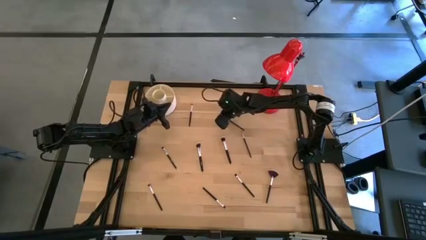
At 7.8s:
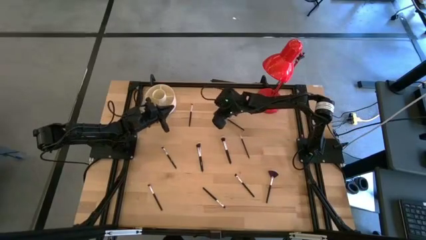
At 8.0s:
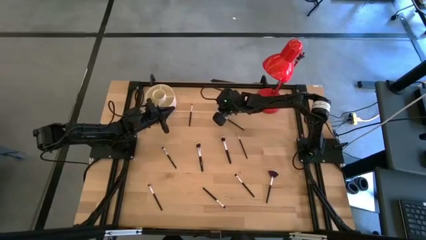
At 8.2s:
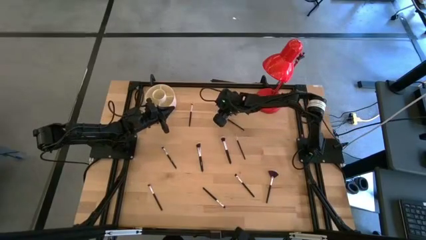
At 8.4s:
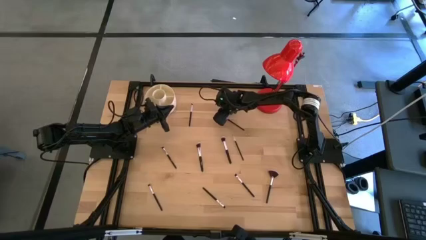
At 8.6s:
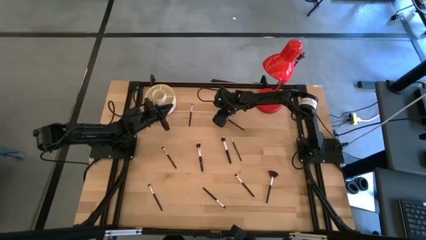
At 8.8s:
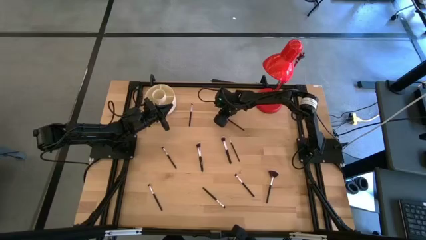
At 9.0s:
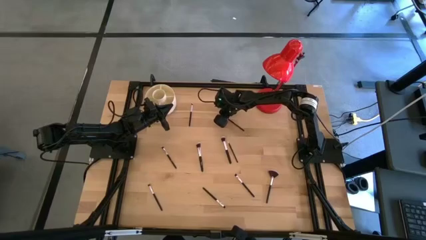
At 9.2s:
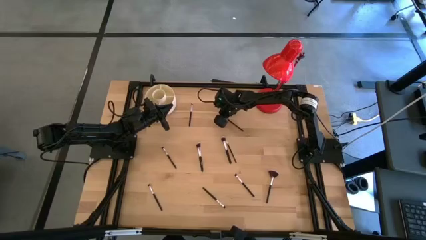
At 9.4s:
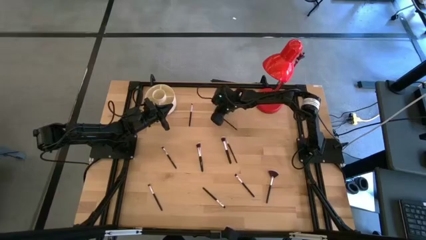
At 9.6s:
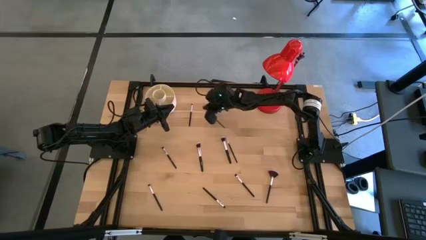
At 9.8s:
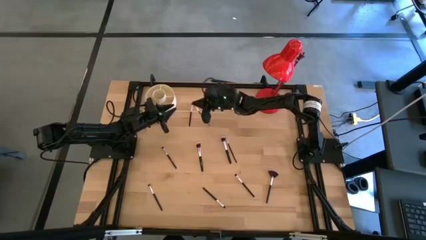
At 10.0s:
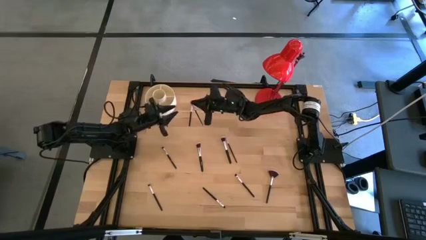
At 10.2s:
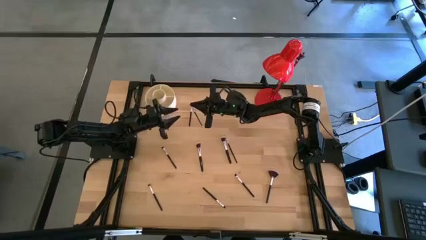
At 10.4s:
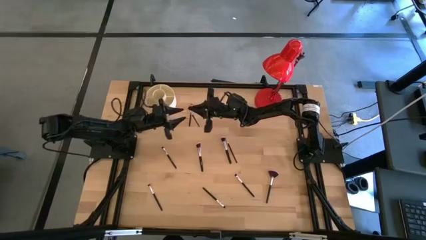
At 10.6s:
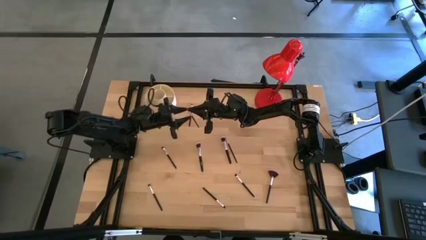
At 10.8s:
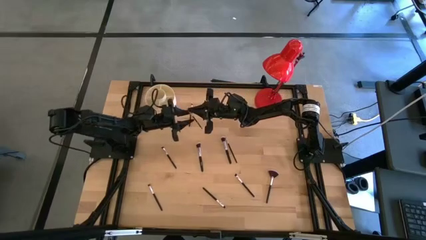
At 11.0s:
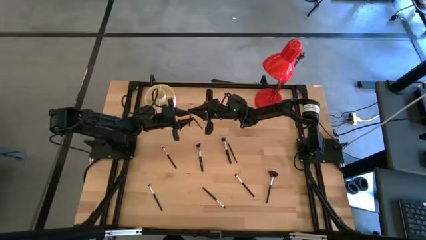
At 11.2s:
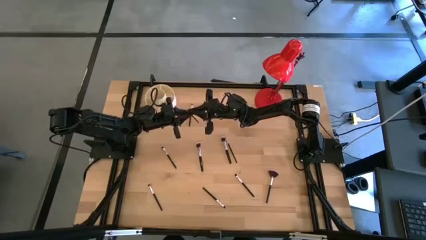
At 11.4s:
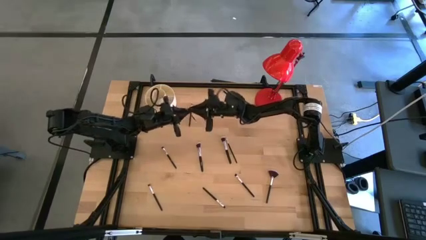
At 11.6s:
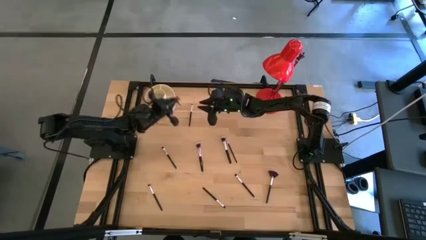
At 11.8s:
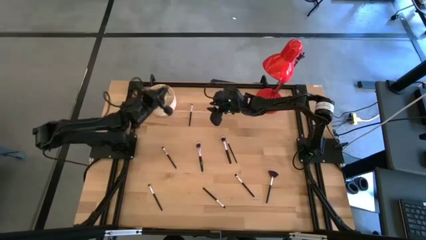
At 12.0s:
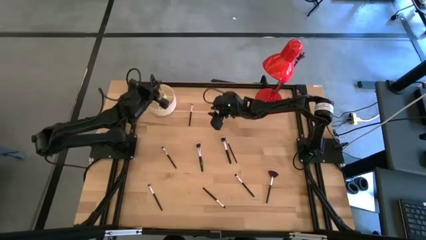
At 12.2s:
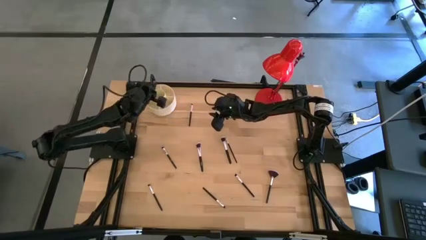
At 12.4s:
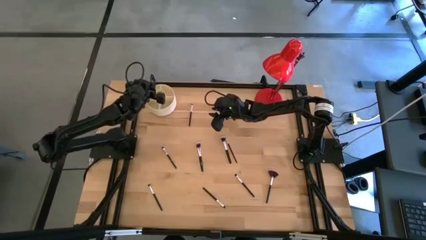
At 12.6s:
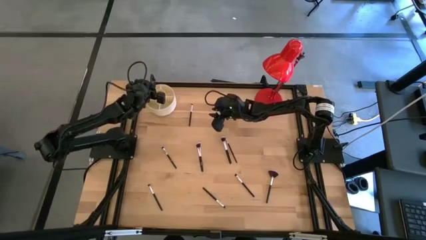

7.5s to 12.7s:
Task: Put items in baskets/containers
Put the eyeshadow brush into the organizer

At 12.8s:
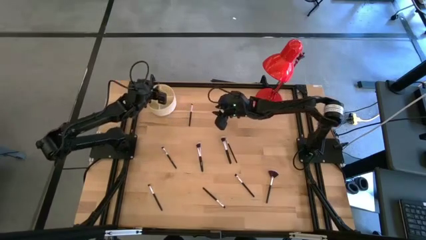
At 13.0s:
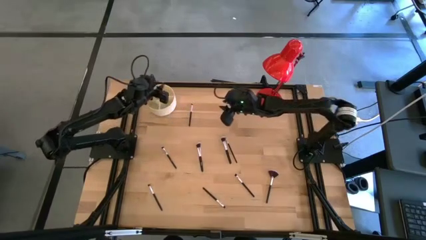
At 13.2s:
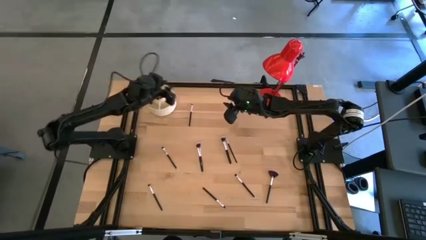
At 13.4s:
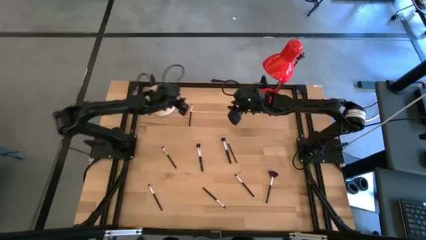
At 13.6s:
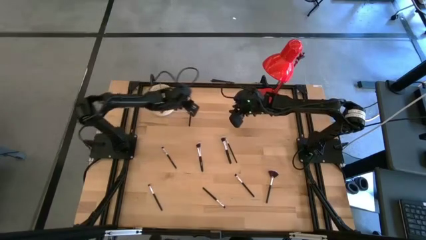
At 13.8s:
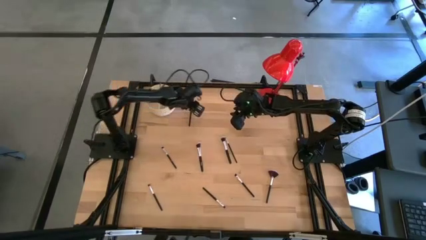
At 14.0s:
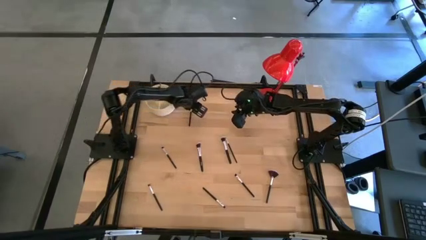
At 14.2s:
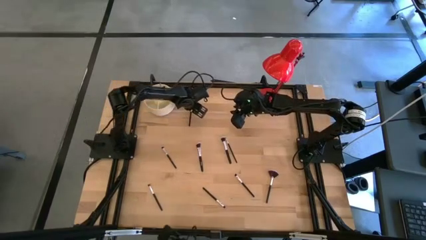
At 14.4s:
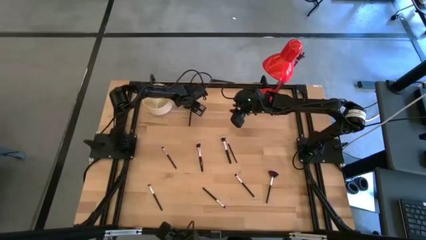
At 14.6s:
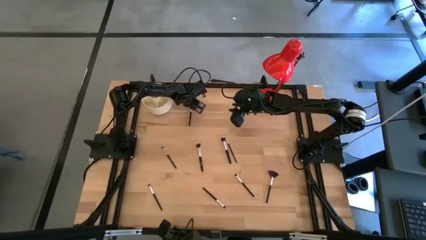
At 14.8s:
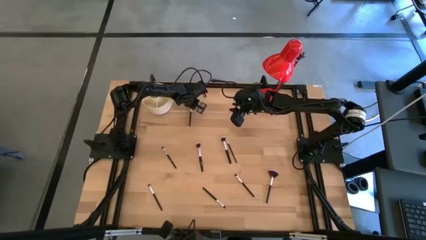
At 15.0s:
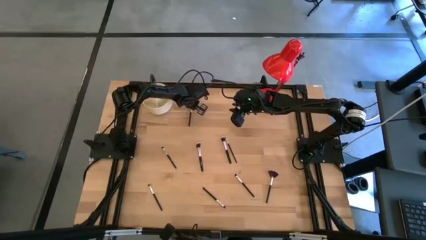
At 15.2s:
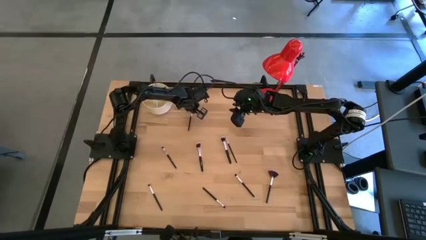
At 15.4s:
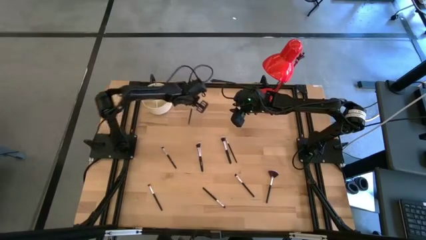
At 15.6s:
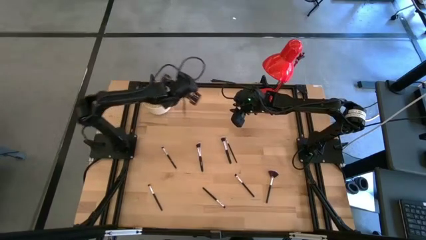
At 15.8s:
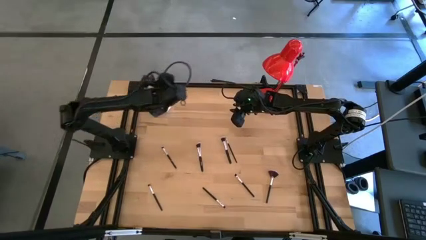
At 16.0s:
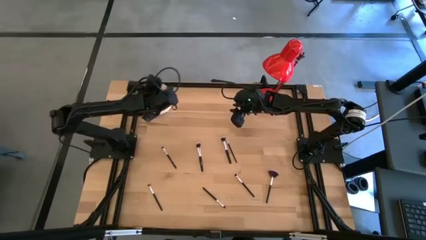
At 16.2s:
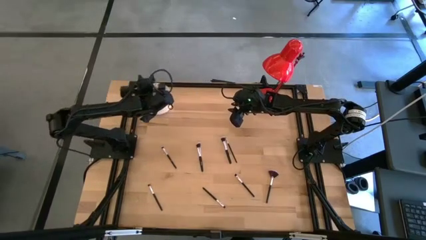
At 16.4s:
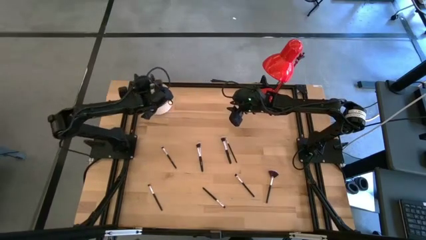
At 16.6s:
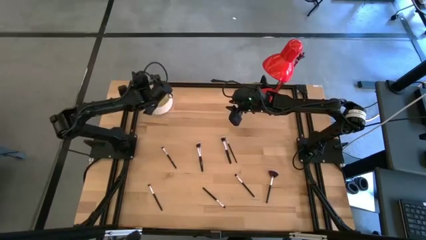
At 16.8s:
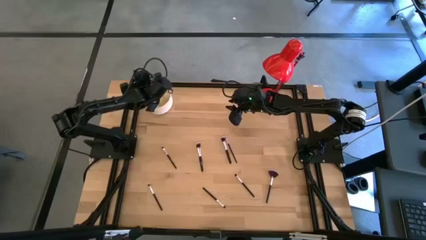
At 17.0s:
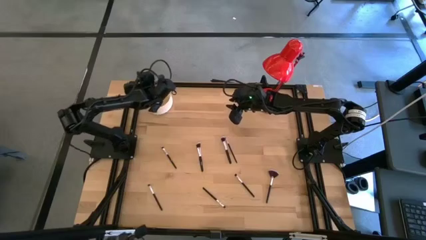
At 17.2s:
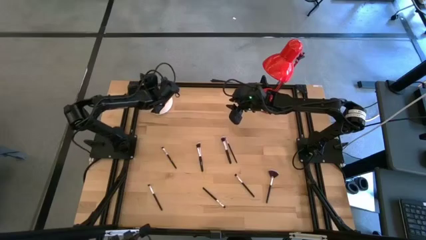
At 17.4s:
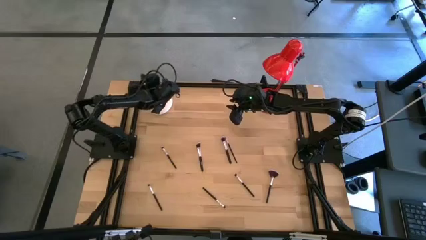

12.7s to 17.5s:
Put the eyeshadow brush into the organizer

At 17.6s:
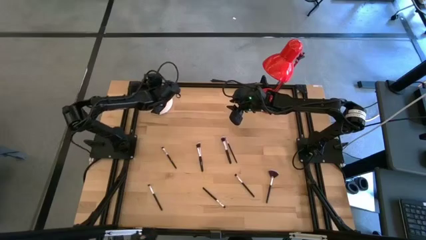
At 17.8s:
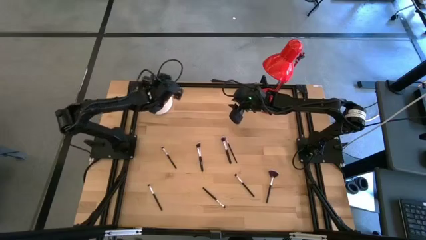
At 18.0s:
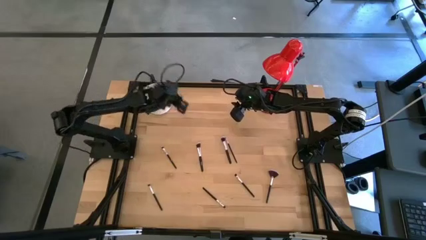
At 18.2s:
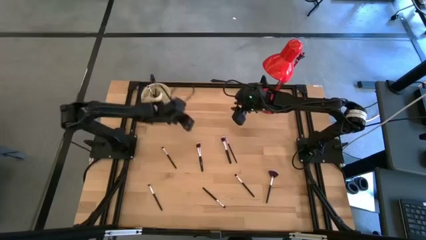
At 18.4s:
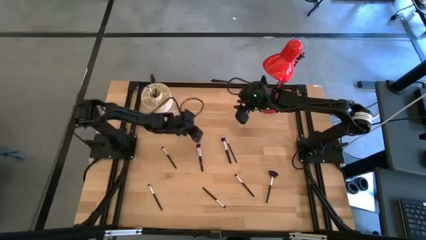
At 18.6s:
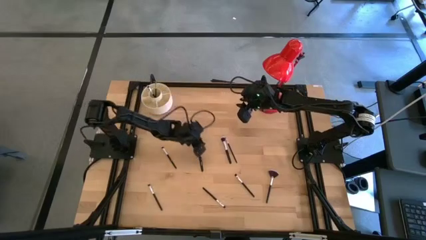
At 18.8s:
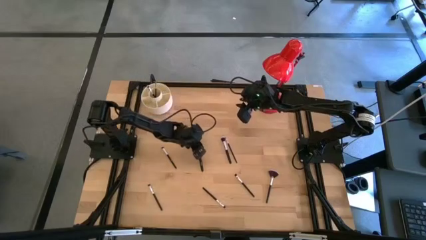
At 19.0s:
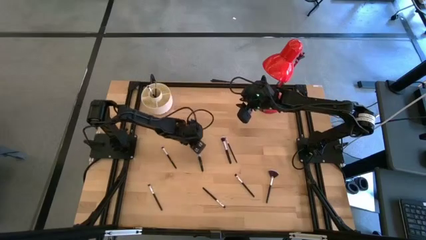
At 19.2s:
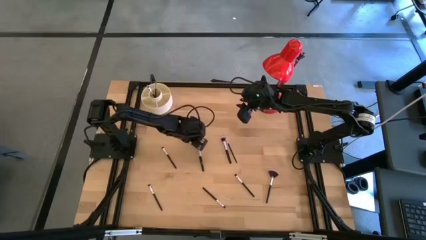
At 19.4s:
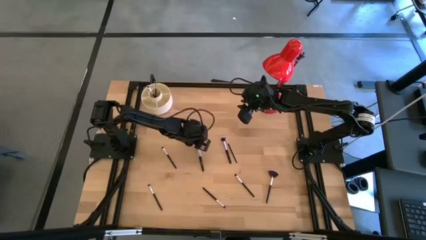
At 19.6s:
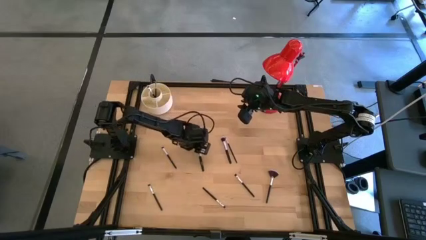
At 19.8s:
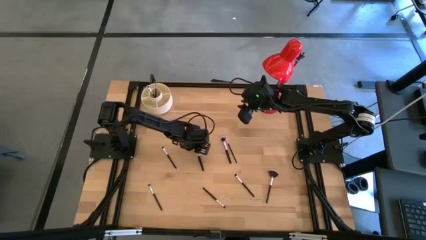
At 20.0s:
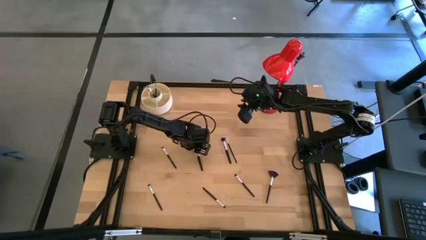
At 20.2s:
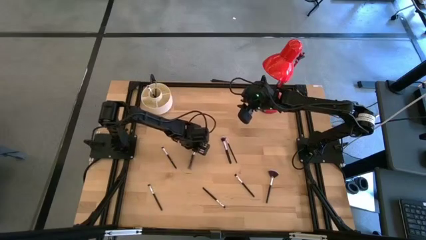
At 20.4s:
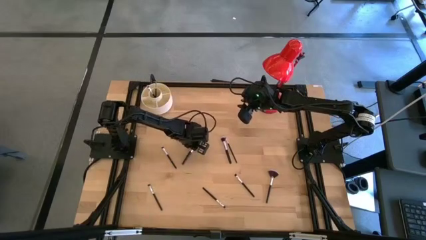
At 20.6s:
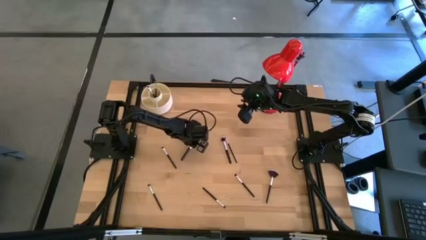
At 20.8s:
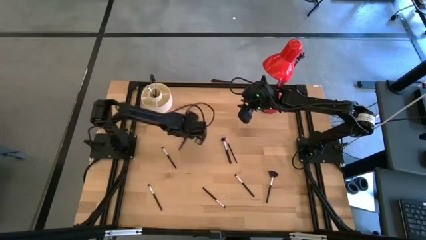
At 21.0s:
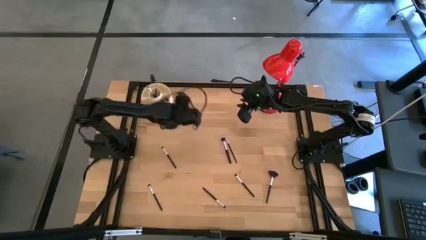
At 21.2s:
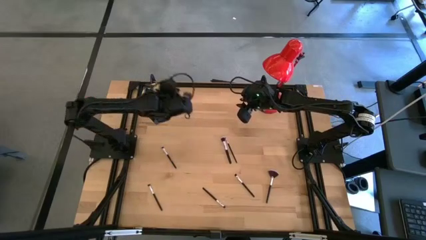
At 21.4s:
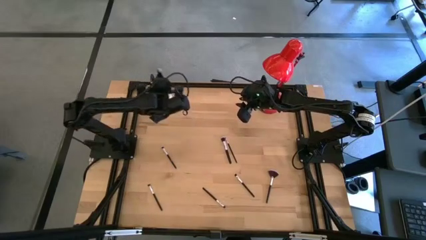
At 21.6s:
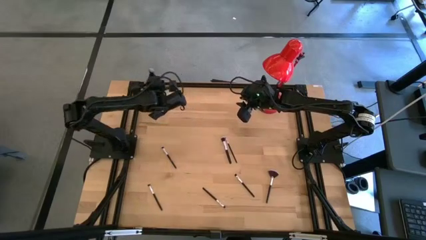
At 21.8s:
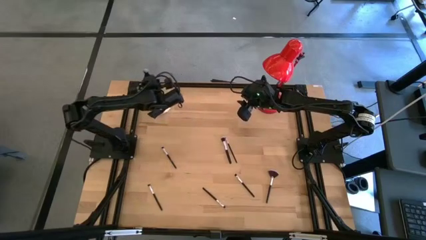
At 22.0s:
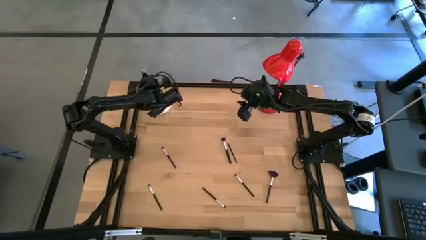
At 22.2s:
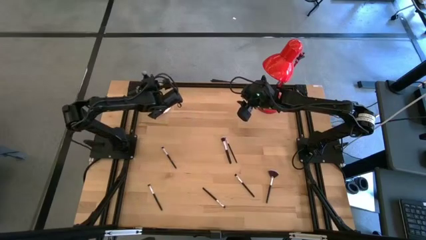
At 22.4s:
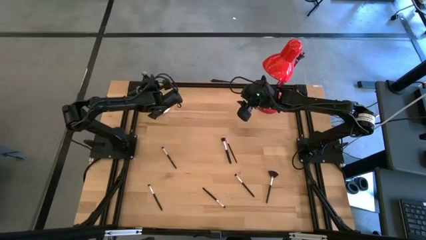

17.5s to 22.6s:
Put the powder brush into the organizer

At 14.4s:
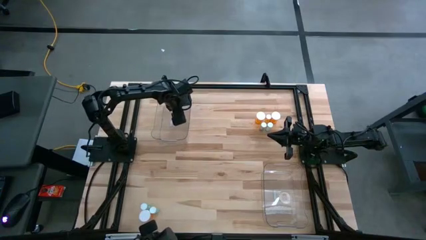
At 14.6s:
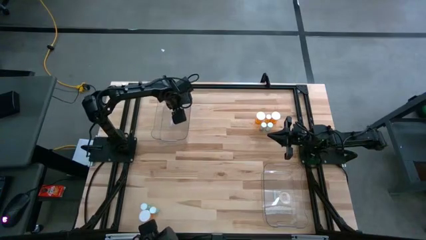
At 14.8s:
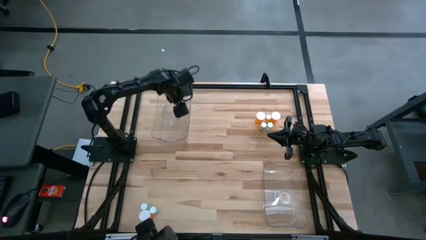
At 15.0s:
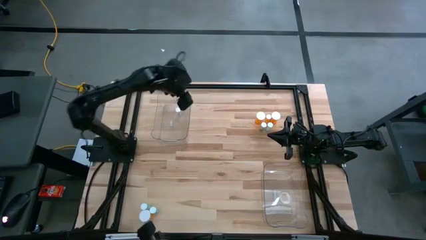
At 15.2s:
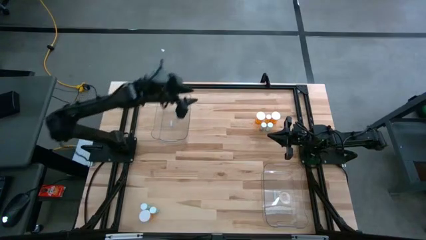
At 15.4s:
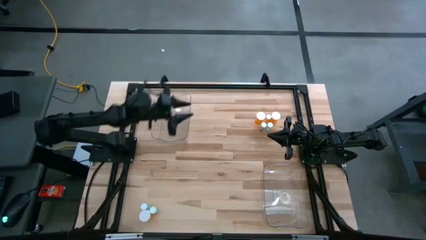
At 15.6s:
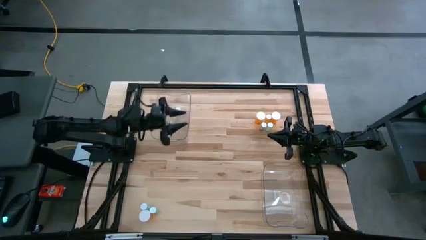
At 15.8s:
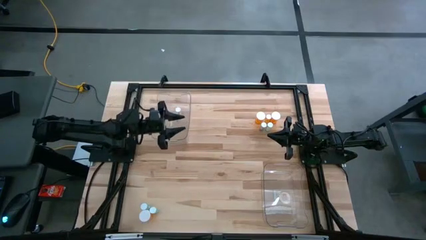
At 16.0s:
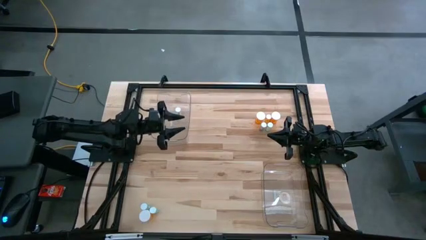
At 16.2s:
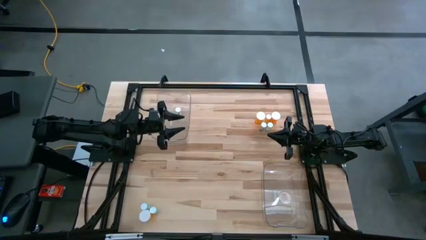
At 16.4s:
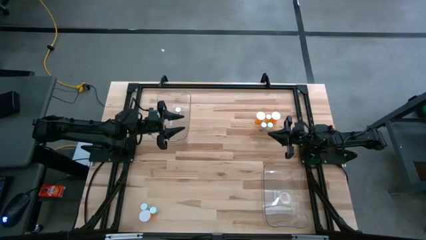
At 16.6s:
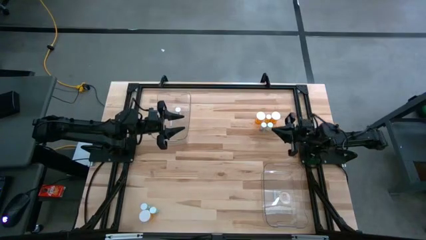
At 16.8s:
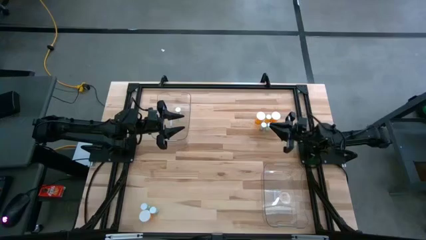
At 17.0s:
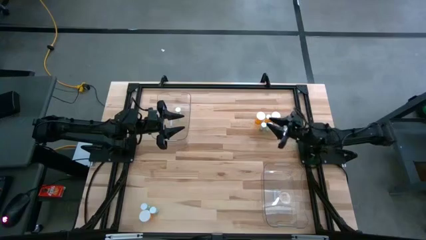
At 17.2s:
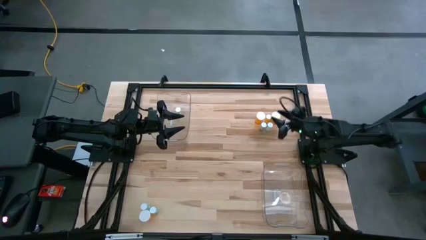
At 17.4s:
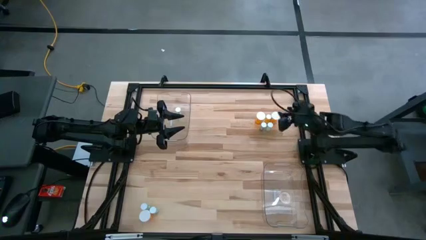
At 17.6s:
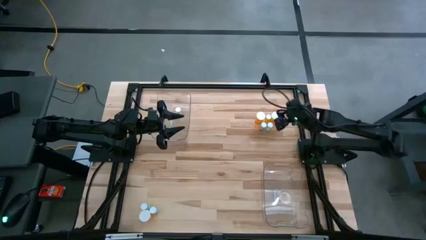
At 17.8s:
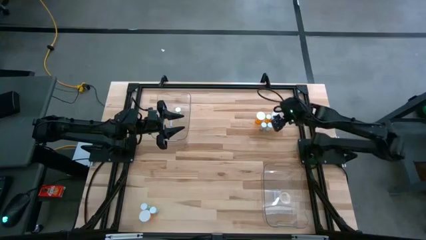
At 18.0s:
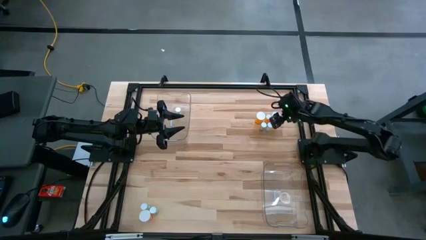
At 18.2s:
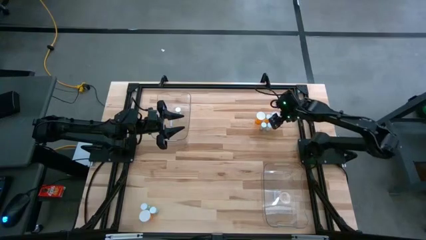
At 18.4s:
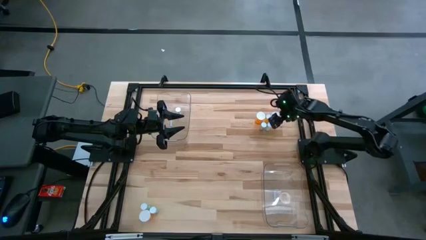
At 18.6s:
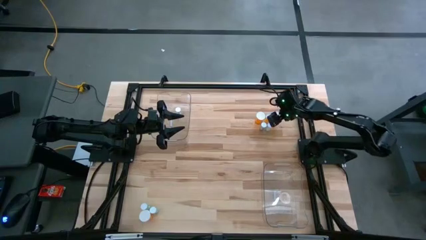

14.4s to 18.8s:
Task: Pick and place medicine bottles into bin by pill shape (circle, oval)
Put the orange capsule bottle into the left transparent bin
